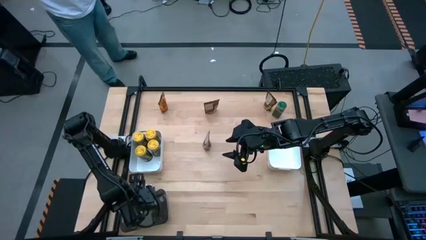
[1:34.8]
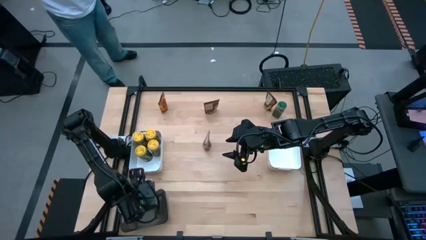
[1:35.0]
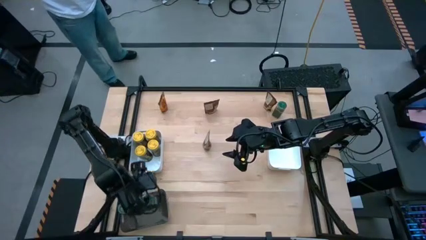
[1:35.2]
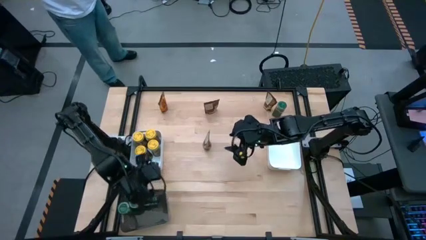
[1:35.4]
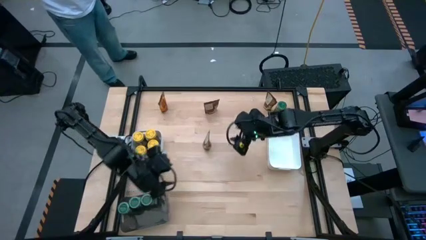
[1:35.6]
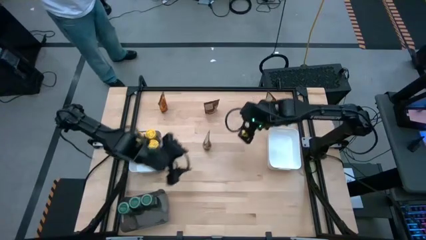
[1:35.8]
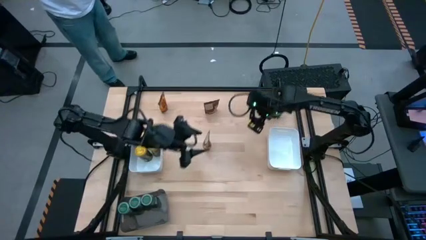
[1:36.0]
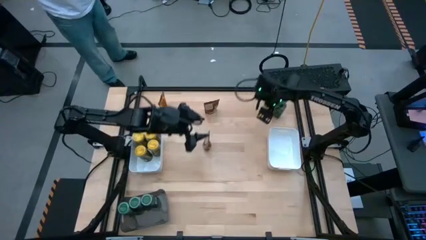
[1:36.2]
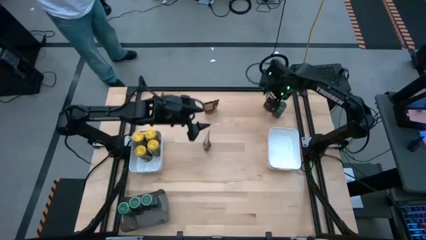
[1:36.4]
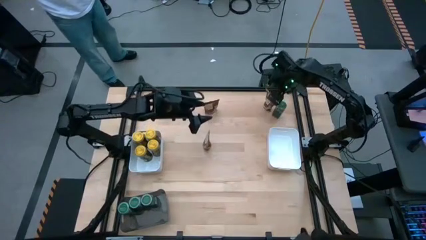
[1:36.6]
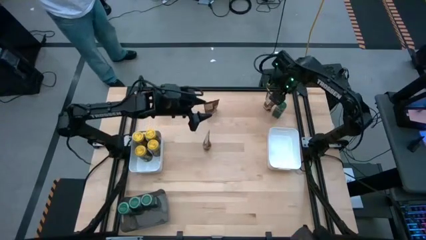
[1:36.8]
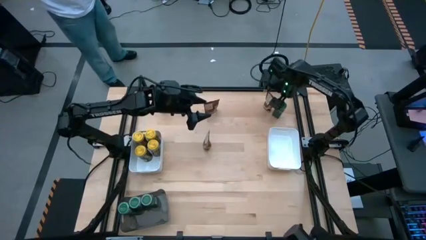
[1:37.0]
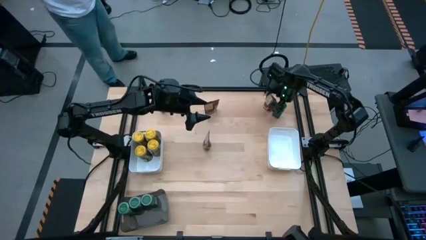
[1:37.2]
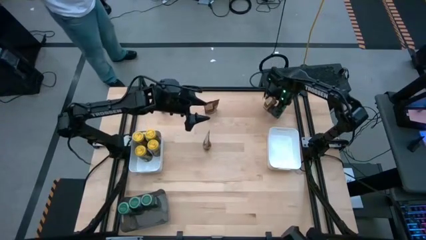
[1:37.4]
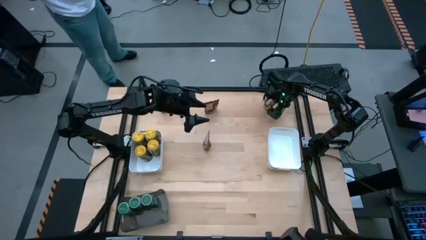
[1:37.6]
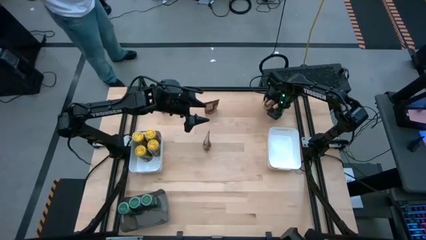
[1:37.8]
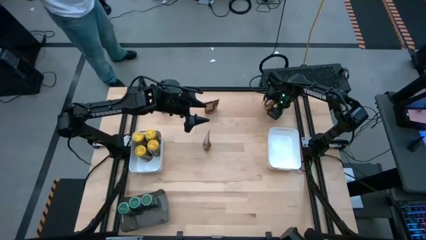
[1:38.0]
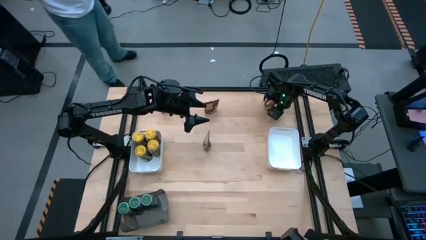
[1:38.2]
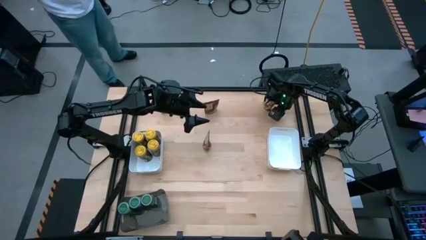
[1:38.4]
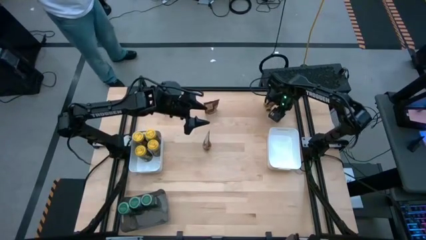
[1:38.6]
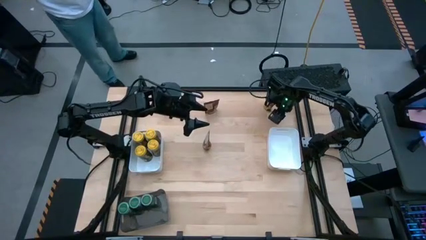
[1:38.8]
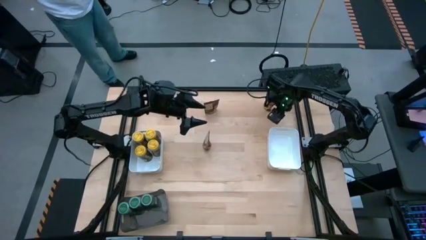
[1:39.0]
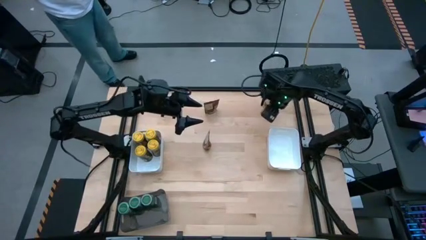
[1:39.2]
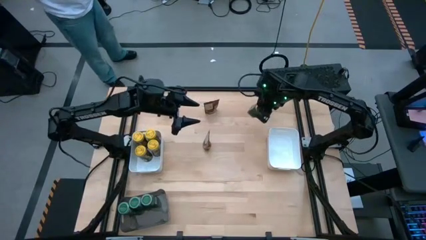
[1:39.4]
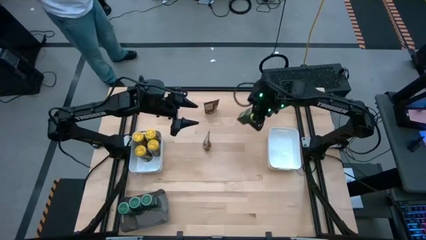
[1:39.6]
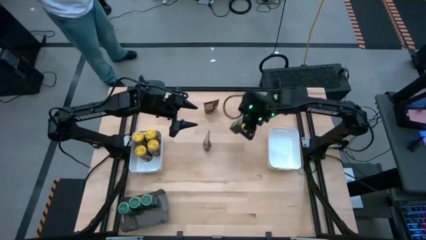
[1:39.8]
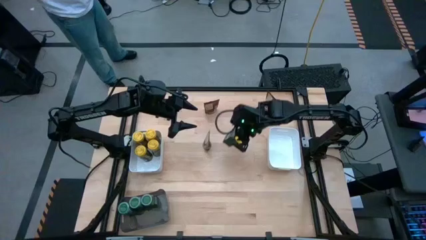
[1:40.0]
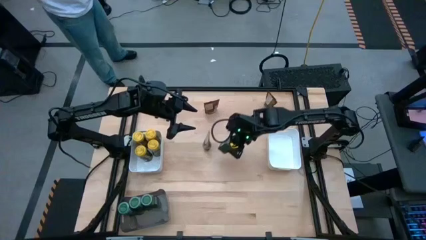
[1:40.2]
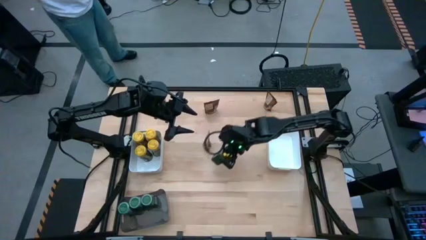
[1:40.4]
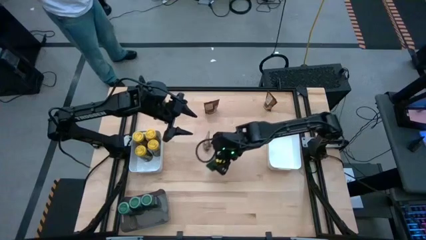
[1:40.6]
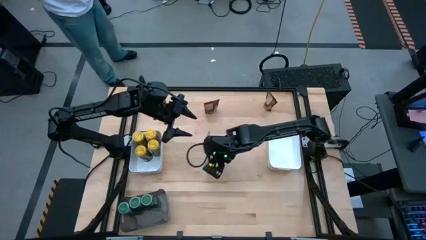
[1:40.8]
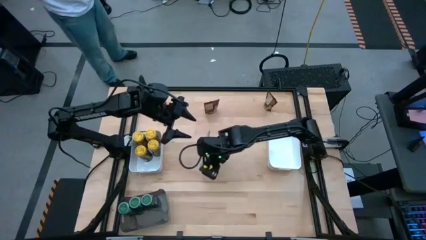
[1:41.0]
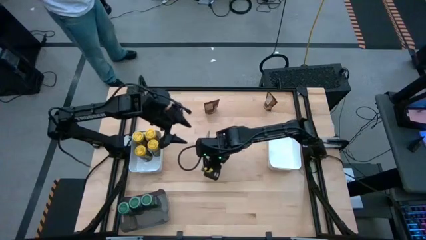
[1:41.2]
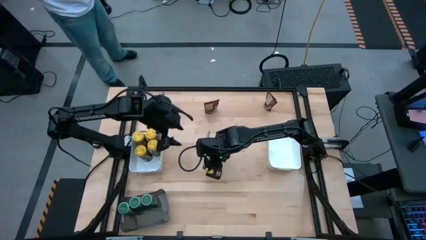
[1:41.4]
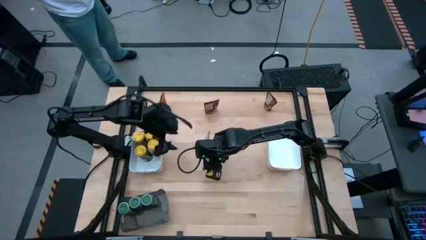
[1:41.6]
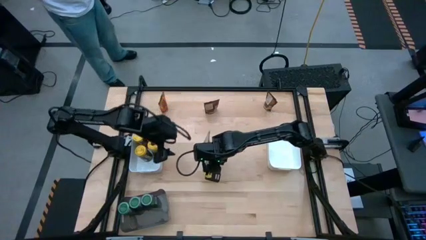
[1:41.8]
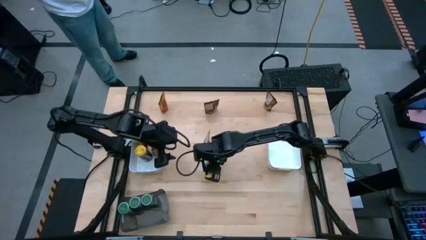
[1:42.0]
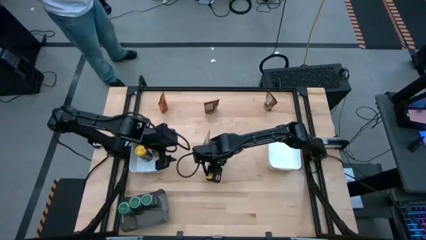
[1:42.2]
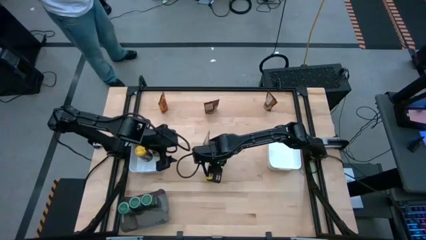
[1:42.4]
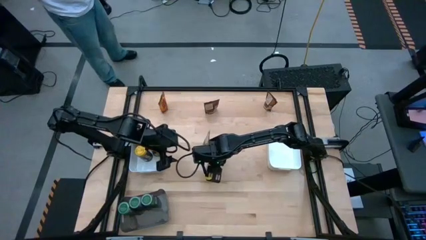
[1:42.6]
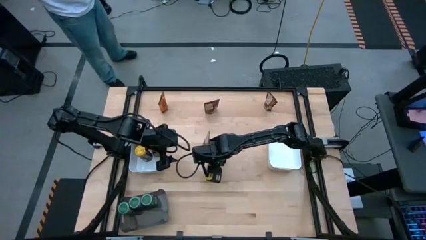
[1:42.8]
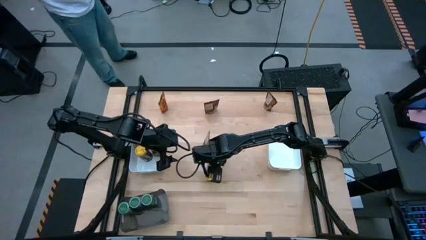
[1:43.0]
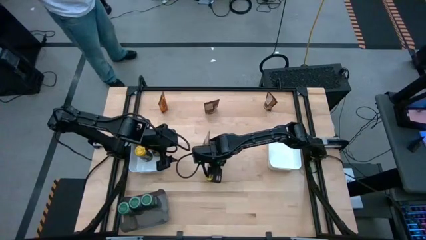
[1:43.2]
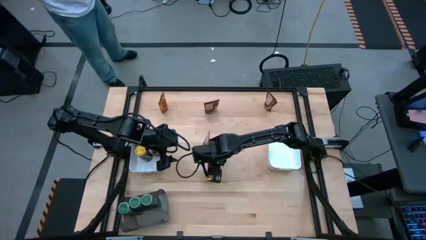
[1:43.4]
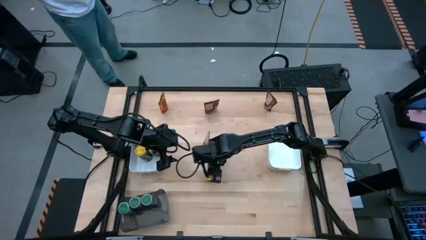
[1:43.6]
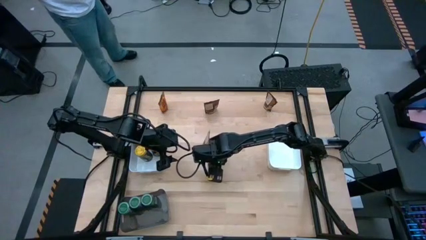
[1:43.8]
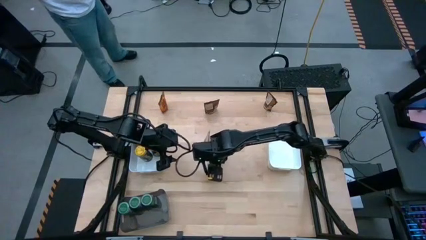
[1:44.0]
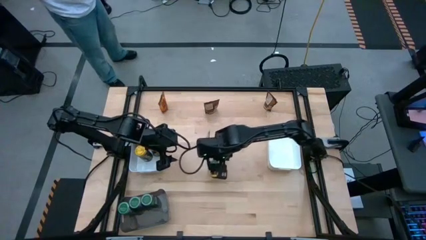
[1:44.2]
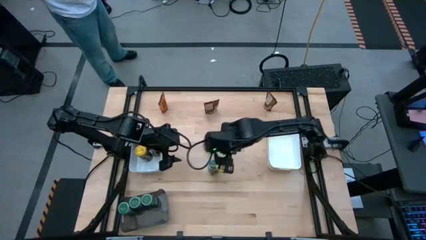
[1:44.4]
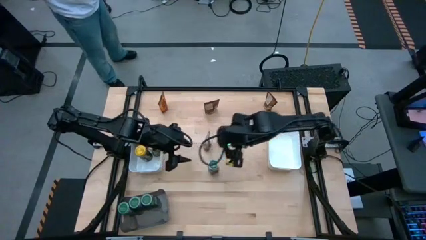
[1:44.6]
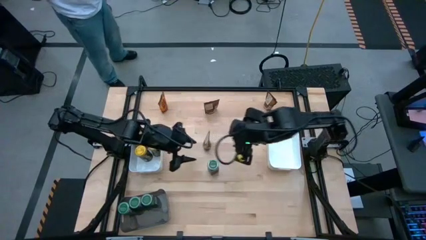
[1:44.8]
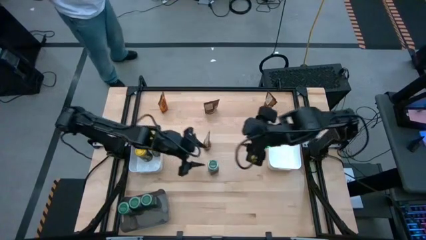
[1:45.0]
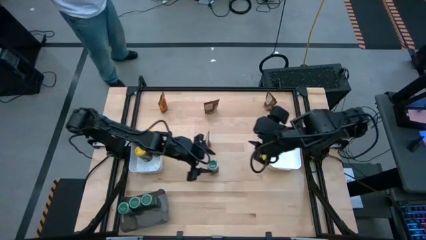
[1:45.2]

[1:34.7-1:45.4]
Task: Sort spices by type
Put the green seasoning bottle into the black bin

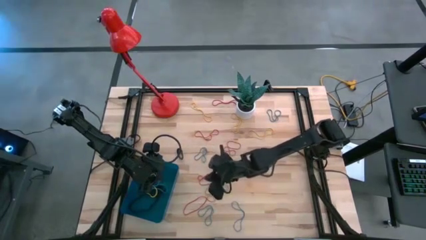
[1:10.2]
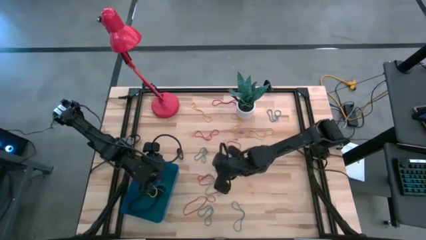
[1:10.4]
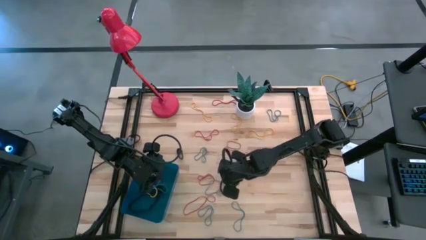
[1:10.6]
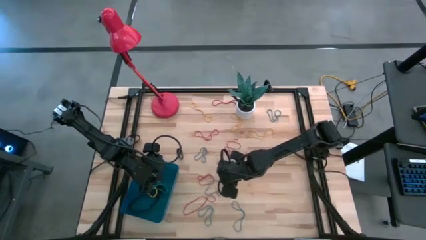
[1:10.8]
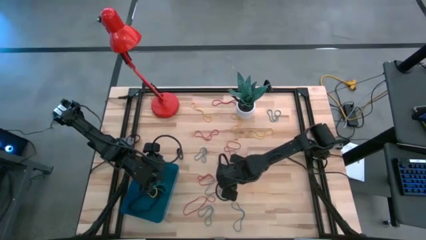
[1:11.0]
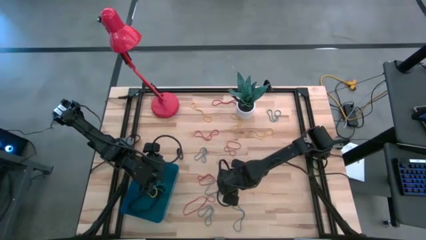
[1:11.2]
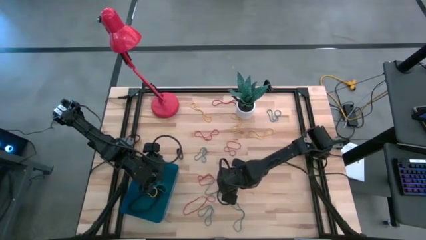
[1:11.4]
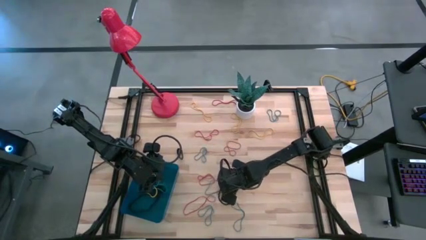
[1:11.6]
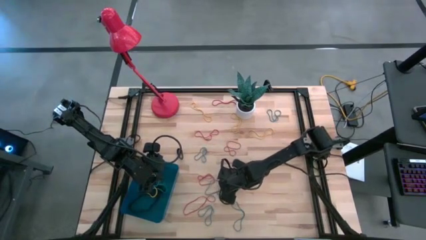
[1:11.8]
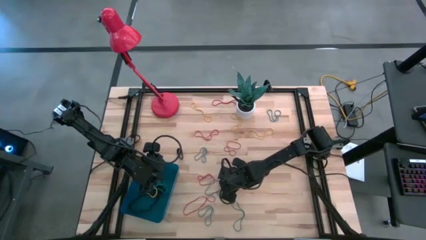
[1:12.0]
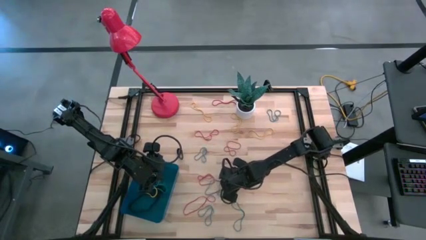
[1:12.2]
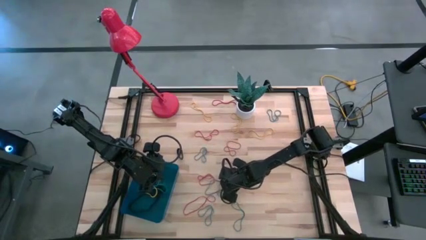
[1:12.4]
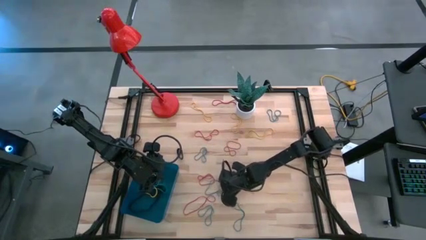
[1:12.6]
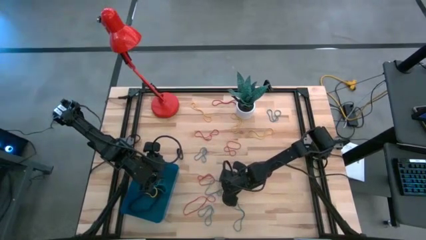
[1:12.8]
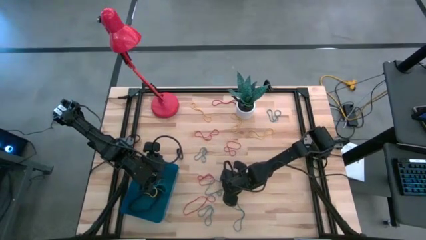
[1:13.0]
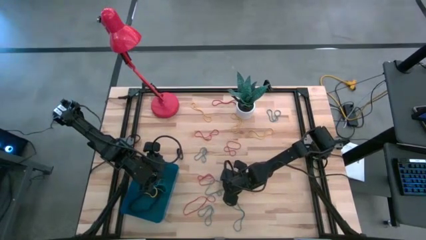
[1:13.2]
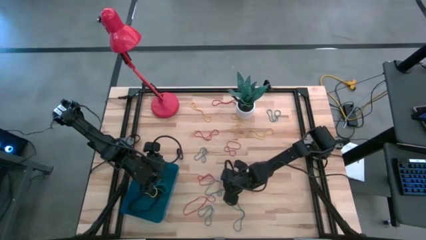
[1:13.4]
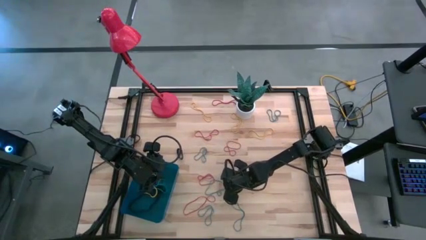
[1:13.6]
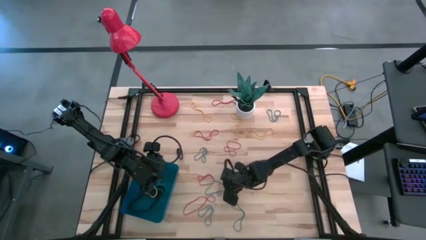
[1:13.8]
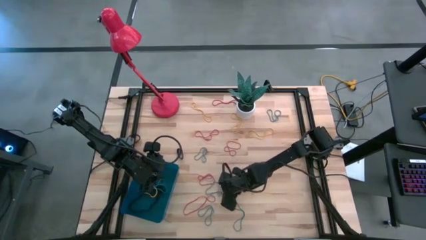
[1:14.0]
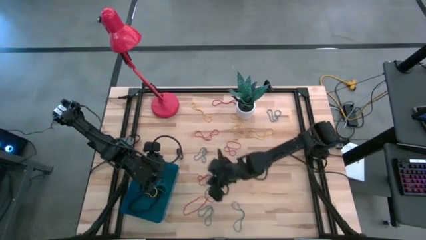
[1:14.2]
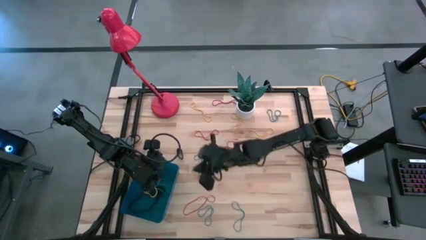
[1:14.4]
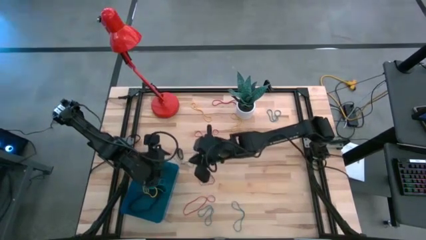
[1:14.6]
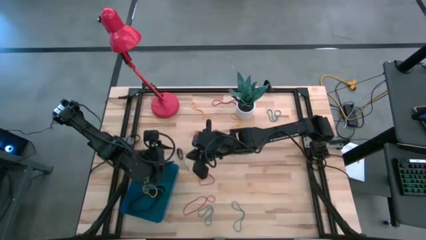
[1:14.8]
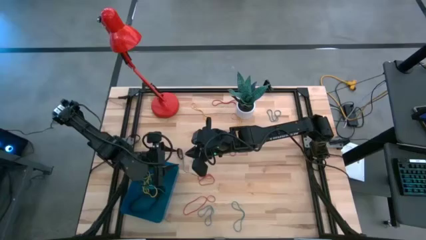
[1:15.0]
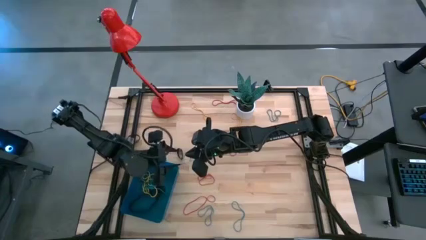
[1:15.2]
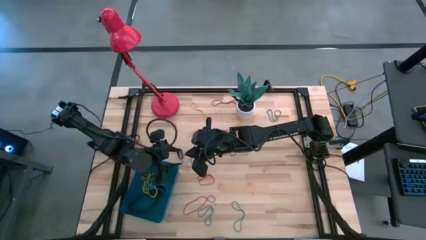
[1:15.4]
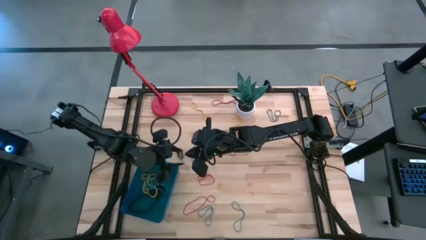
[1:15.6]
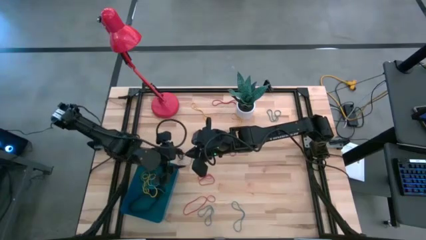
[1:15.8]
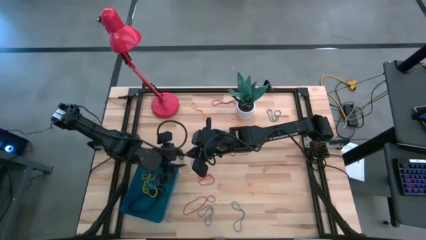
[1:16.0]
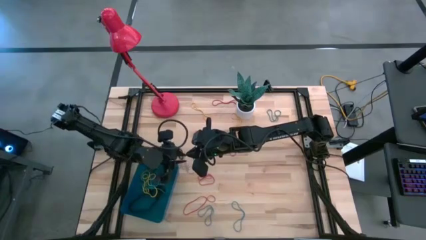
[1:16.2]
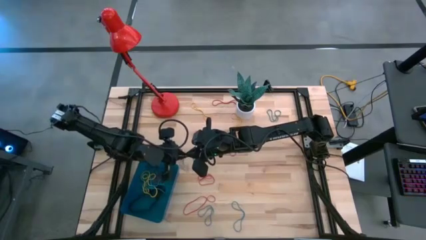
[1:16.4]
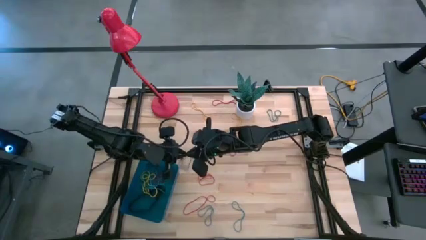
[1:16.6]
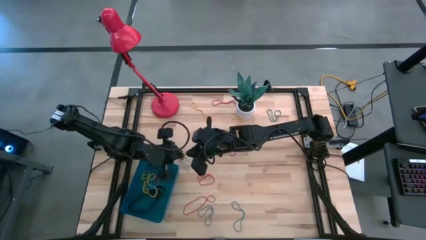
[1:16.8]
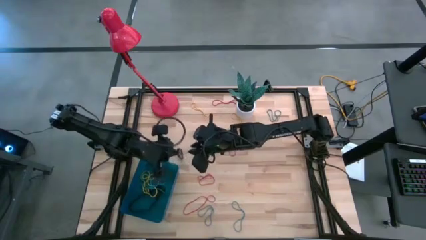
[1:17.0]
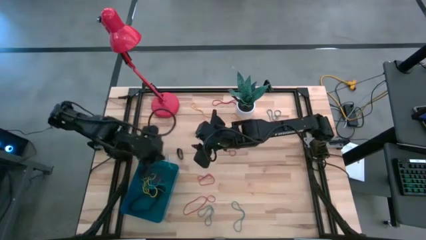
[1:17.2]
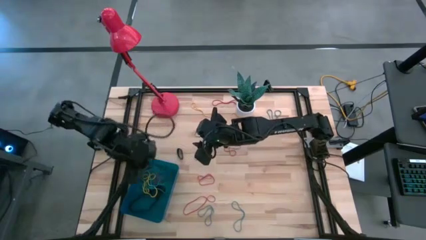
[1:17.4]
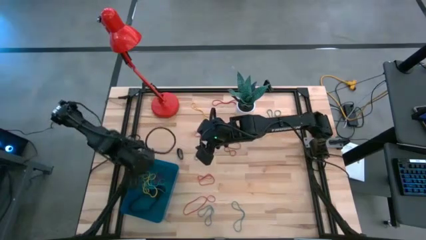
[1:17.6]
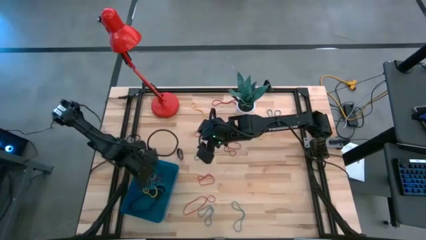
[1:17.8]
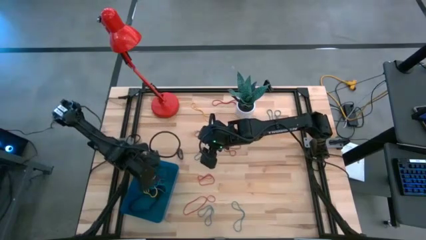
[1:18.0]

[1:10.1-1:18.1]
Task: Pick and place rubber bands into bin
Put the blue rubber band into the blue bin
